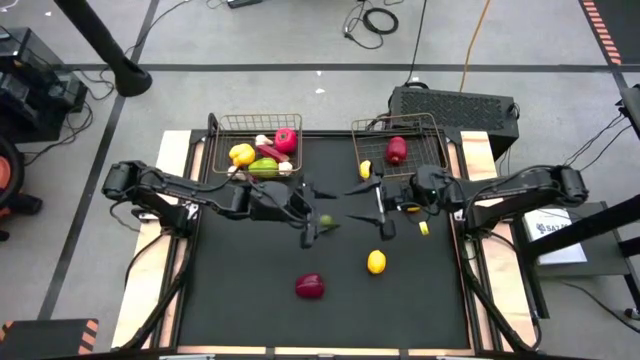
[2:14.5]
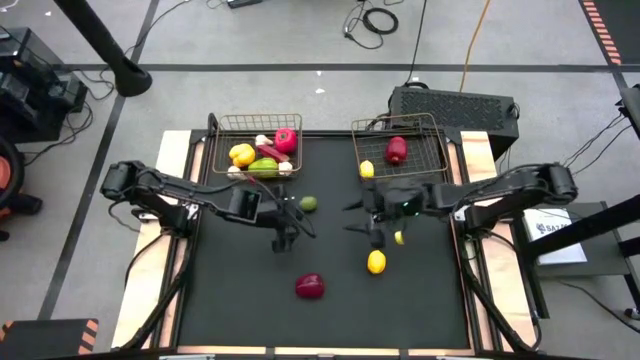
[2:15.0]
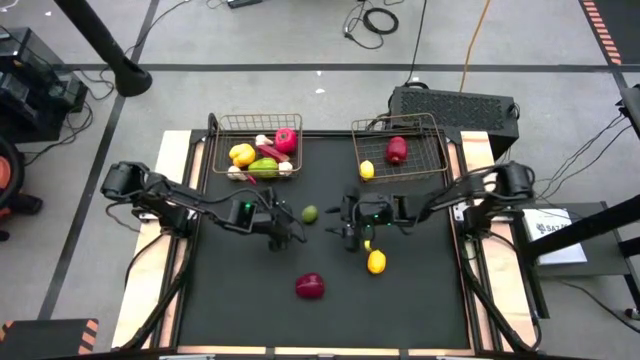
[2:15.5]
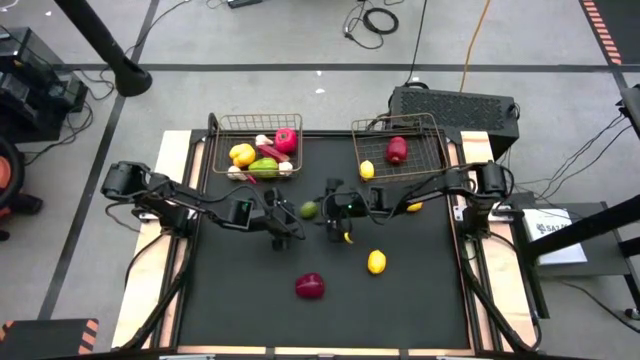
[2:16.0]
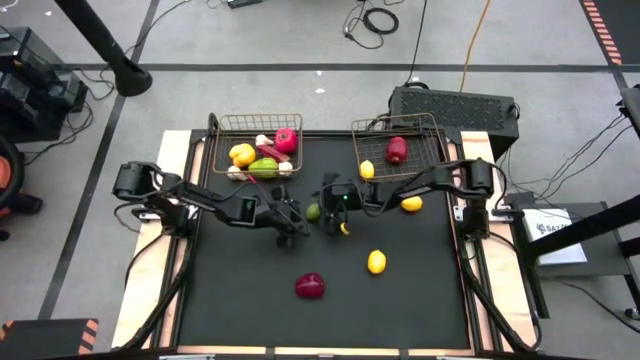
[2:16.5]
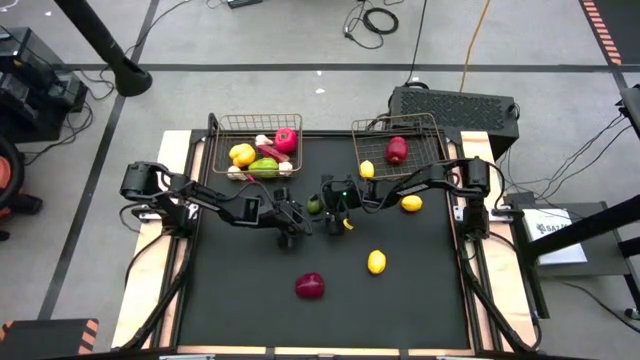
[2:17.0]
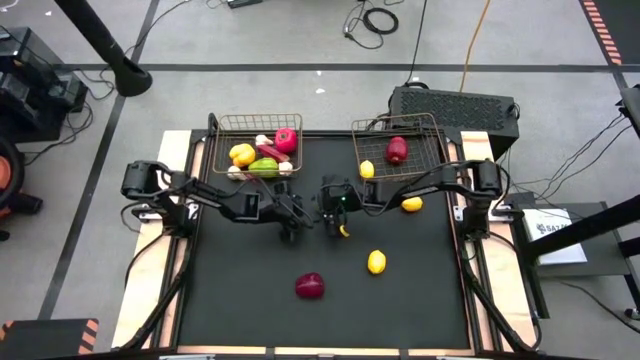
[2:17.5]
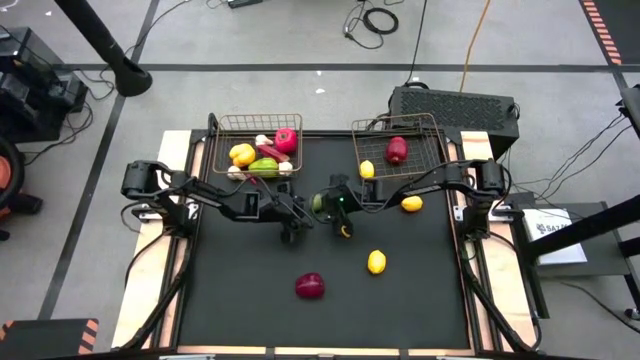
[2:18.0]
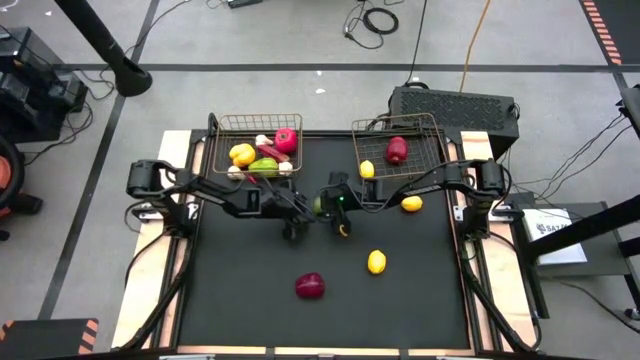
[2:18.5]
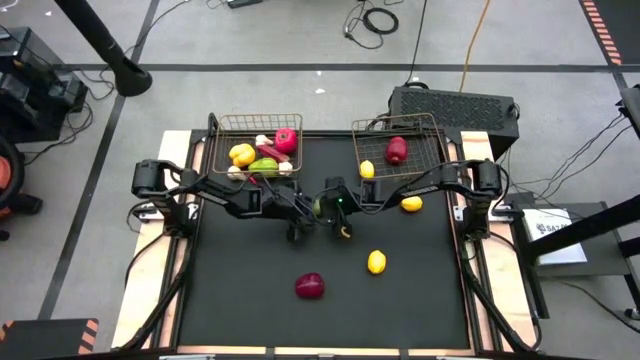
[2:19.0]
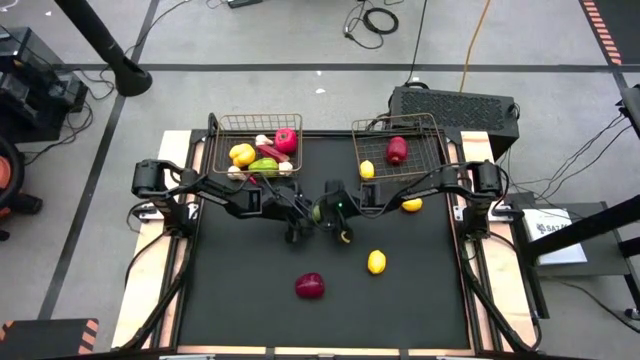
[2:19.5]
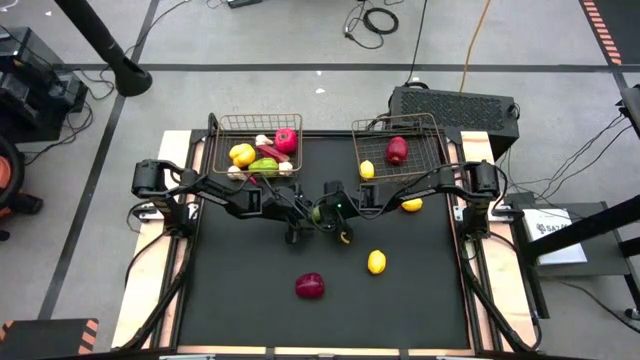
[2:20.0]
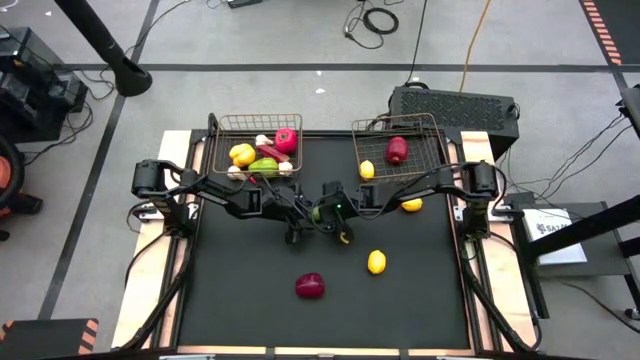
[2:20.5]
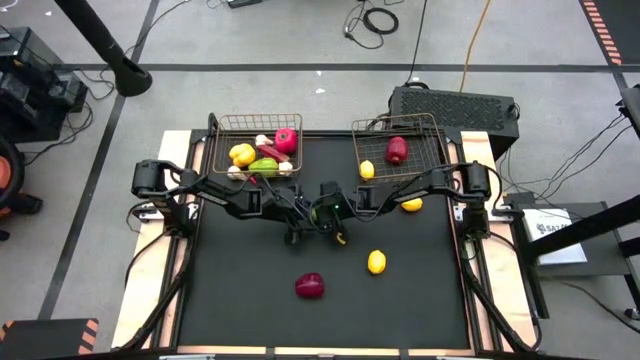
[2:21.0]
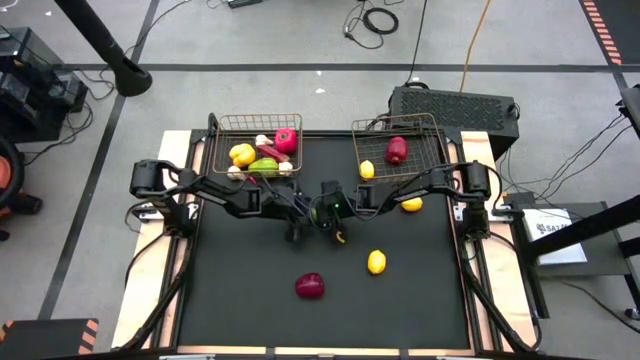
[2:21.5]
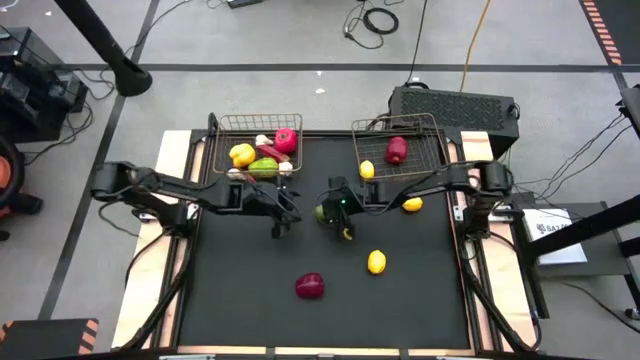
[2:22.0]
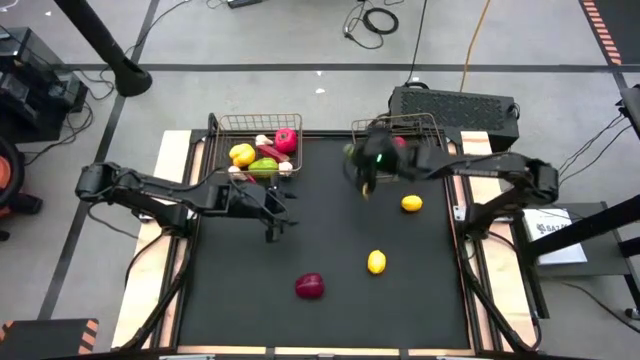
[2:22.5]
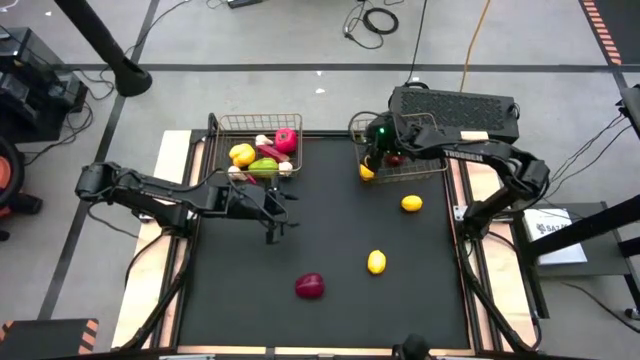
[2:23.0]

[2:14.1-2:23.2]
Task: Sort produce into baskets
Put the green lime into the right wire basket

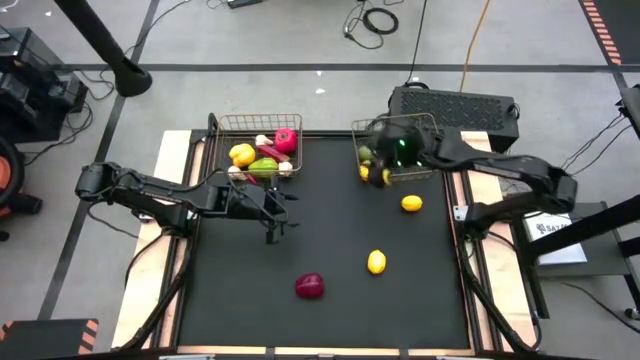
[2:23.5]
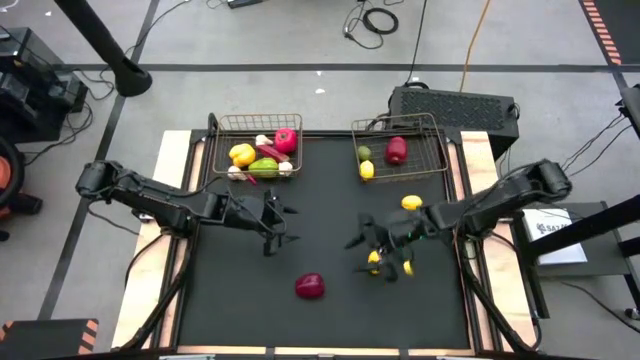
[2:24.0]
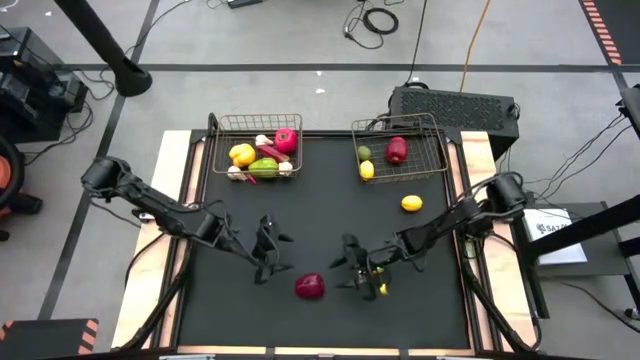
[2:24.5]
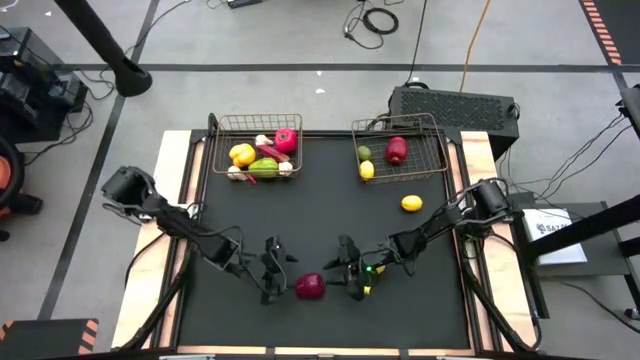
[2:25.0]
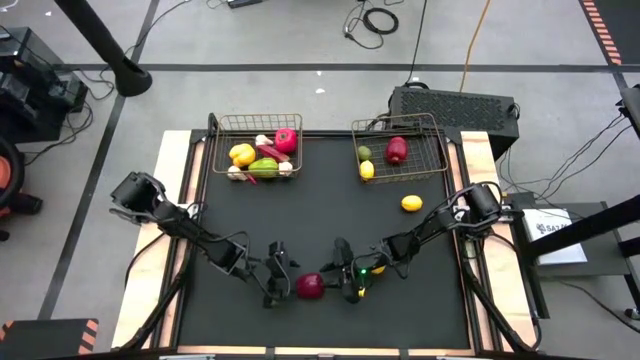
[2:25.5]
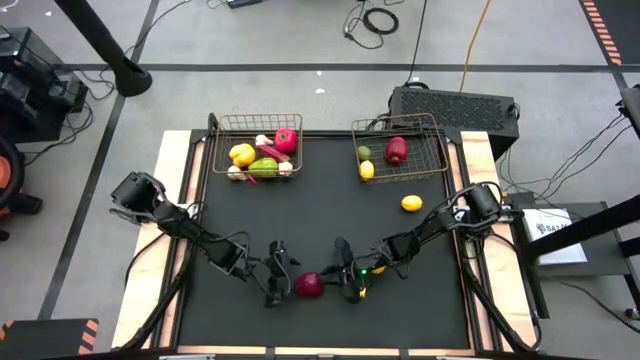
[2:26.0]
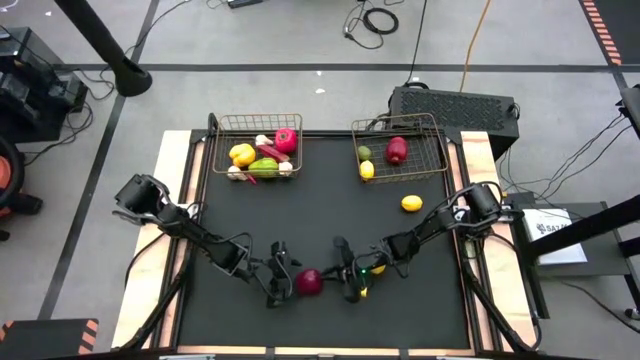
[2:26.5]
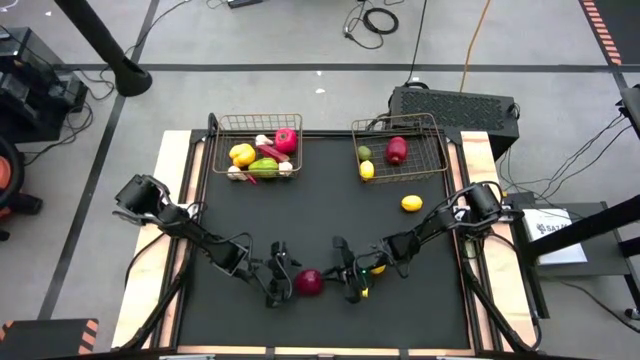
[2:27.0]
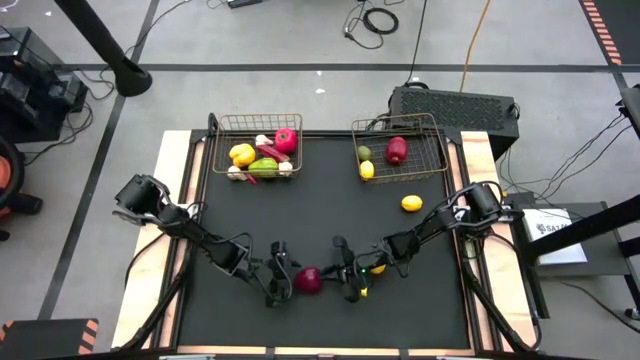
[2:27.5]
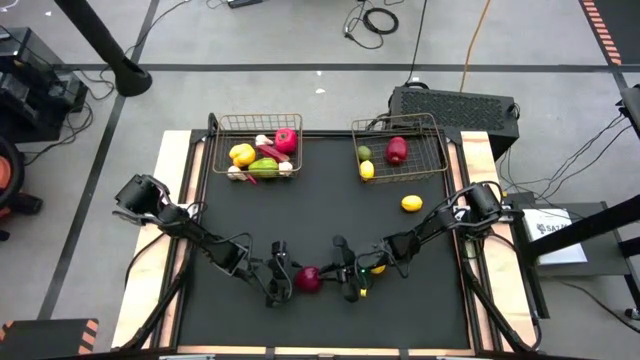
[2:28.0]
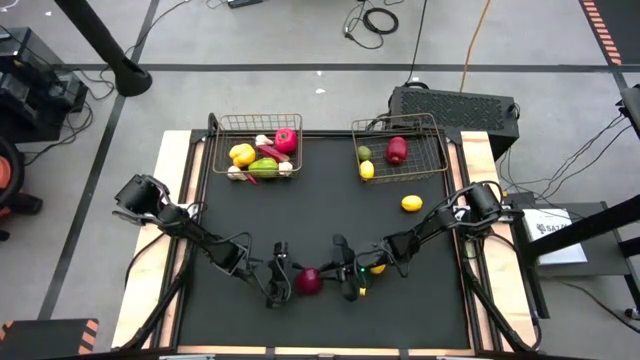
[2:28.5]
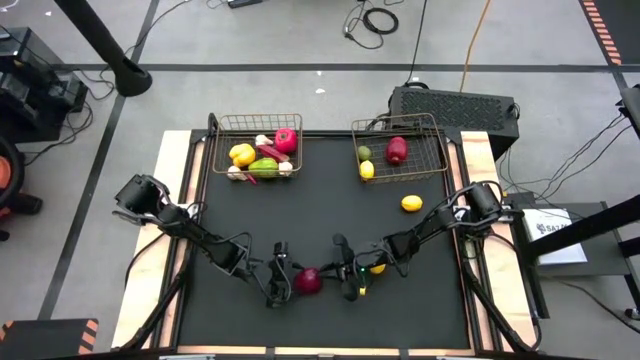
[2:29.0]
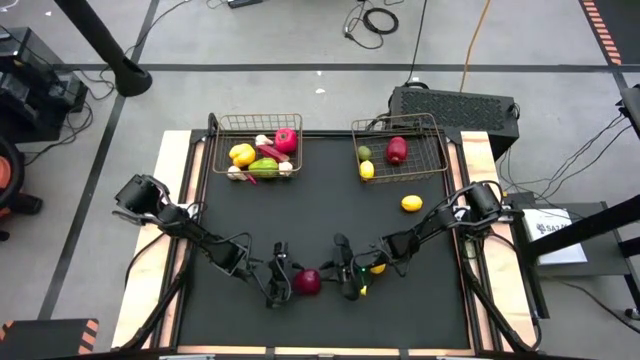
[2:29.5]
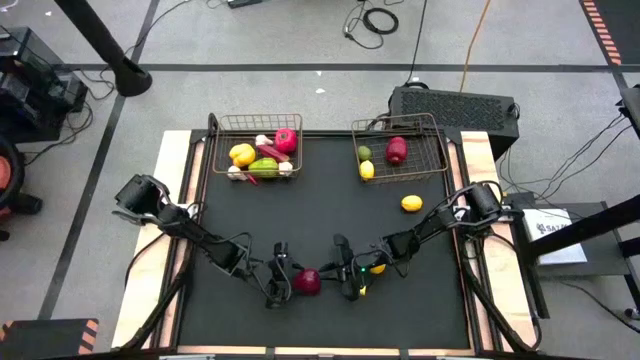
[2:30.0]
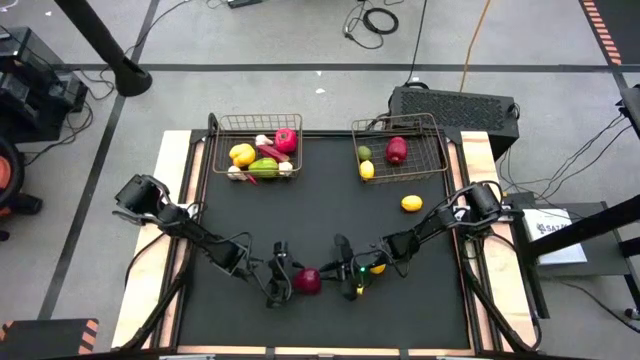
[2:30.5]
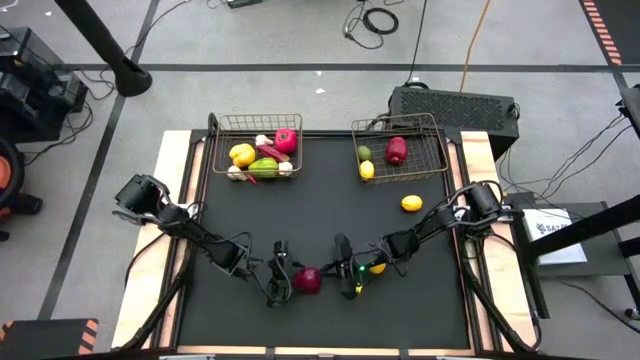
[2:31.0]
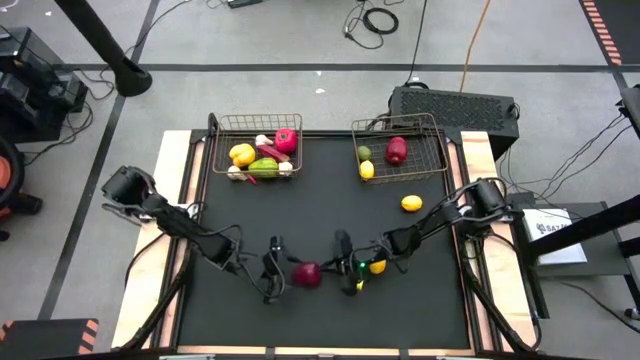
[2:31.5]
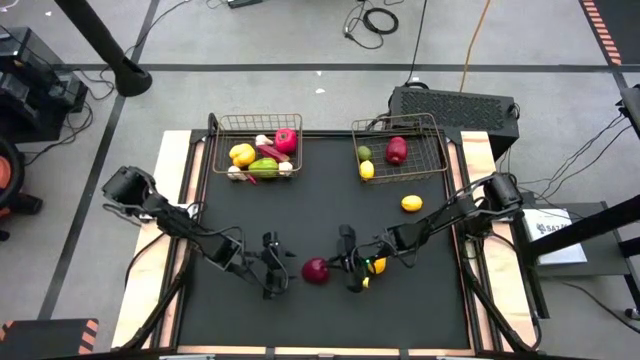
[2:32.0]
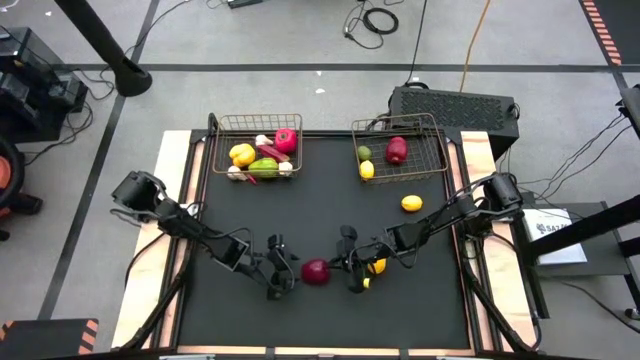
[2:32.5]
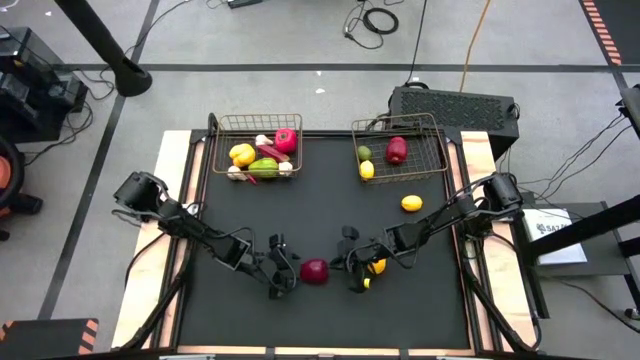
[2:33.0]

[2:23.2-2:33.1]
Put the red apple into the right wire basket
